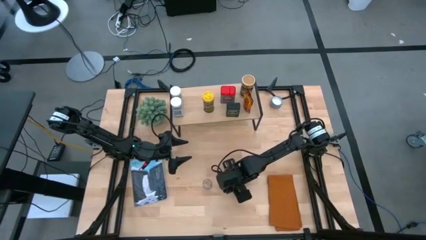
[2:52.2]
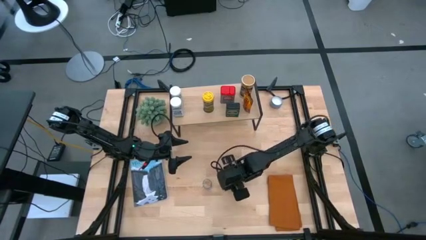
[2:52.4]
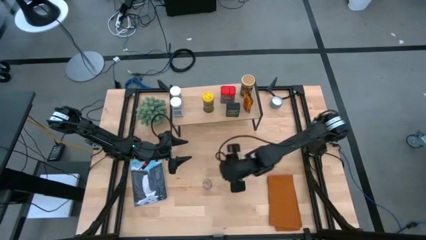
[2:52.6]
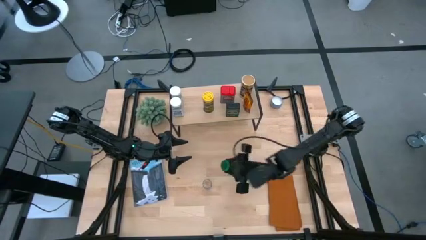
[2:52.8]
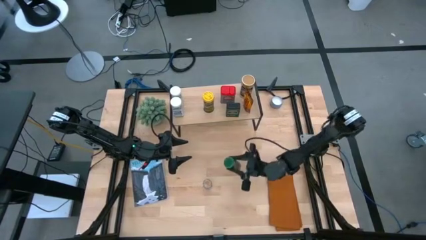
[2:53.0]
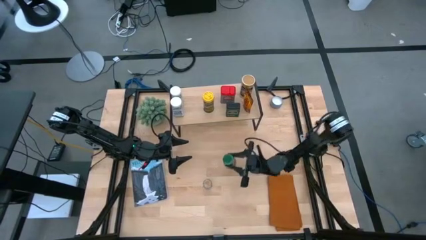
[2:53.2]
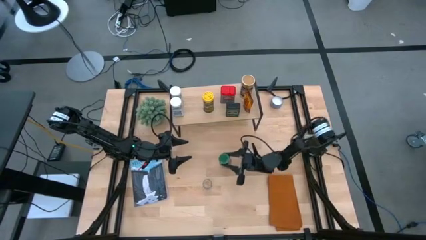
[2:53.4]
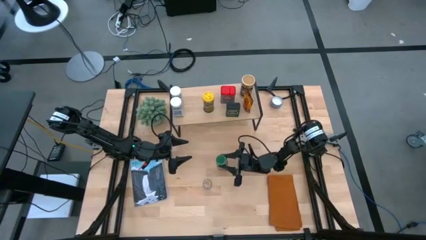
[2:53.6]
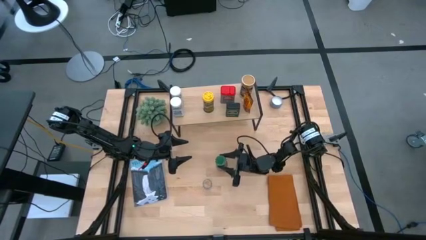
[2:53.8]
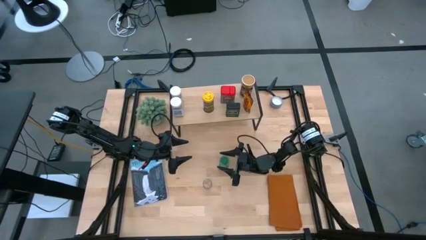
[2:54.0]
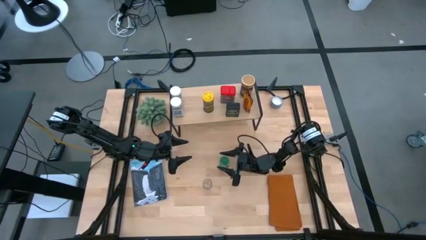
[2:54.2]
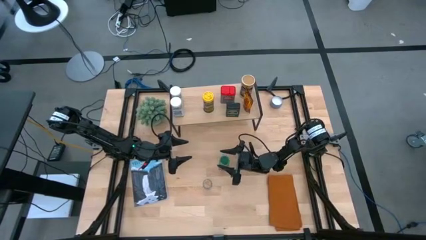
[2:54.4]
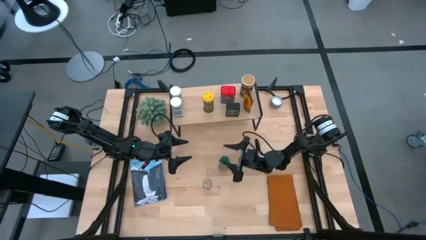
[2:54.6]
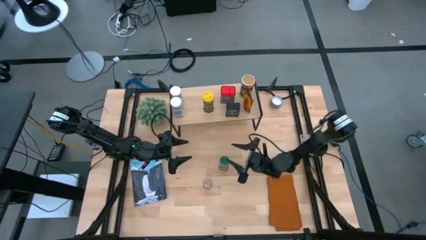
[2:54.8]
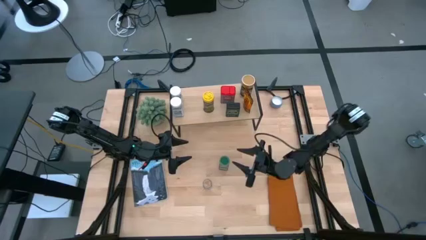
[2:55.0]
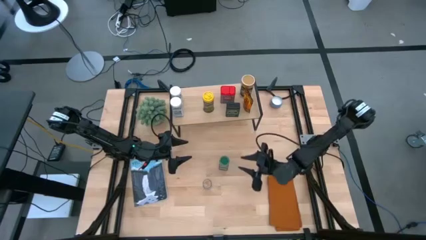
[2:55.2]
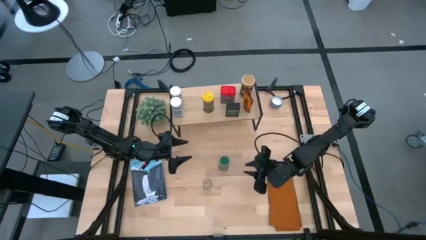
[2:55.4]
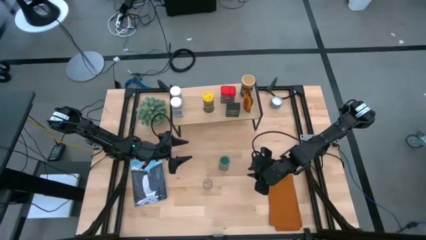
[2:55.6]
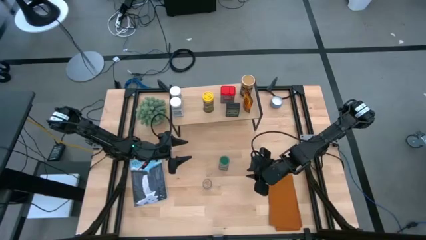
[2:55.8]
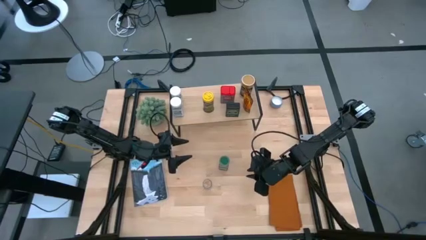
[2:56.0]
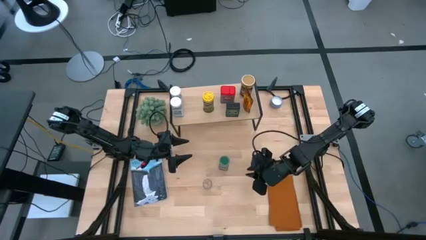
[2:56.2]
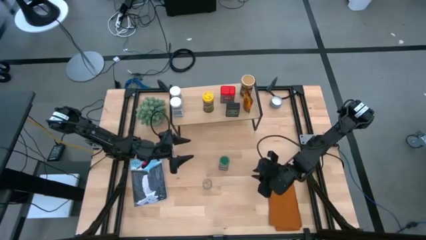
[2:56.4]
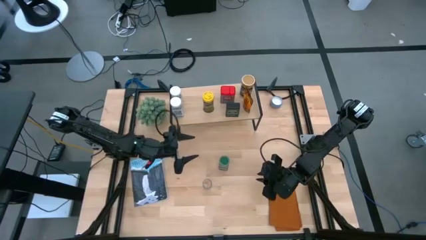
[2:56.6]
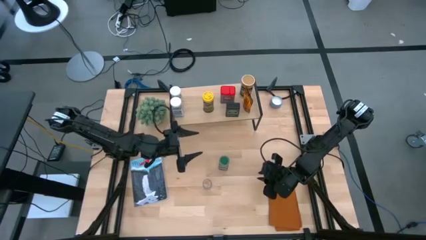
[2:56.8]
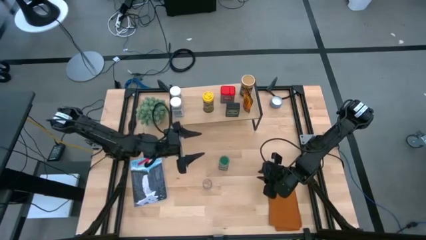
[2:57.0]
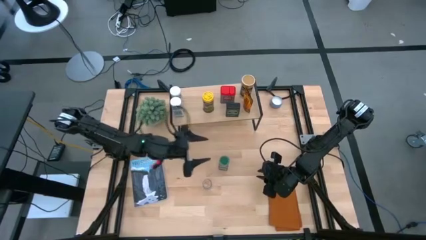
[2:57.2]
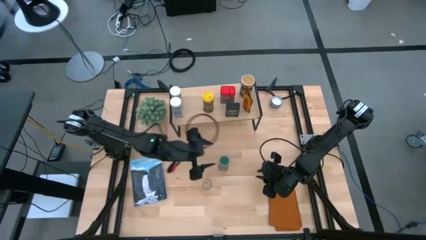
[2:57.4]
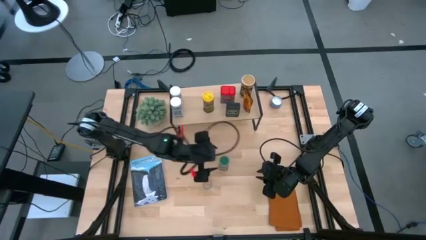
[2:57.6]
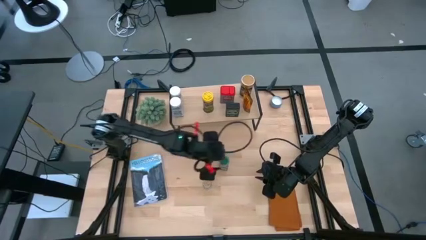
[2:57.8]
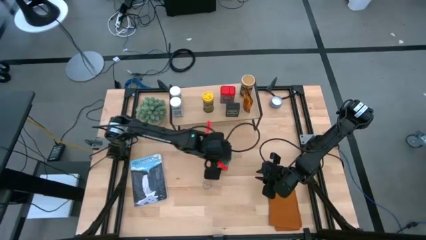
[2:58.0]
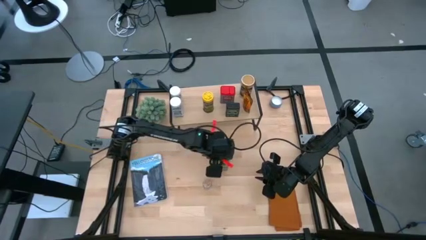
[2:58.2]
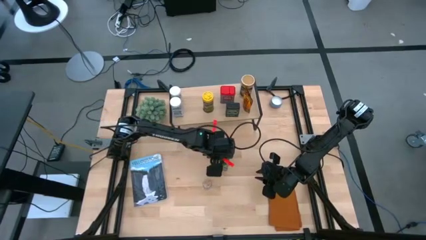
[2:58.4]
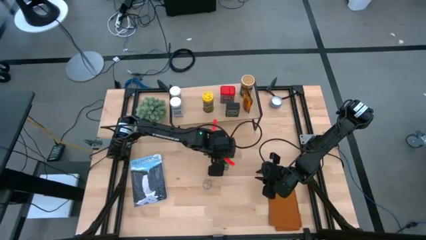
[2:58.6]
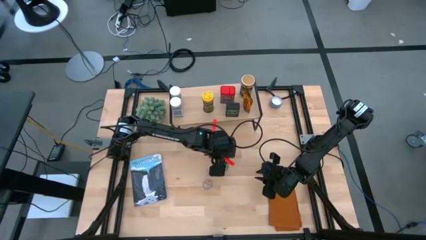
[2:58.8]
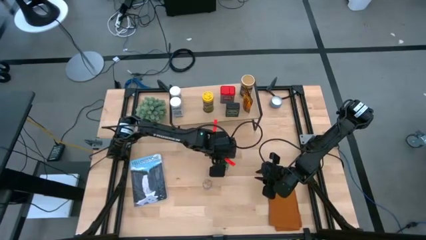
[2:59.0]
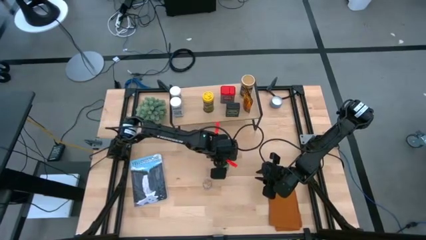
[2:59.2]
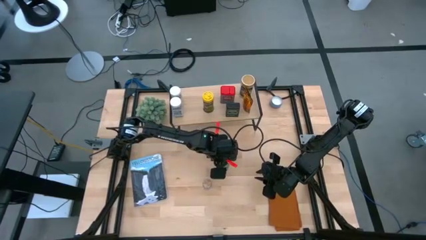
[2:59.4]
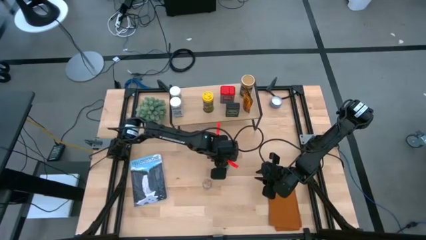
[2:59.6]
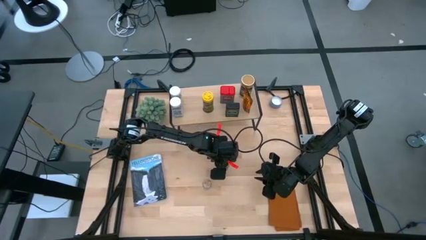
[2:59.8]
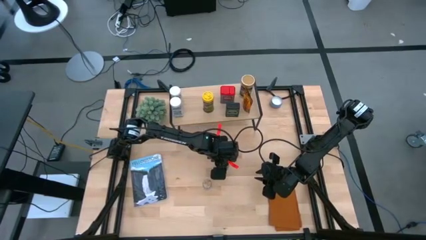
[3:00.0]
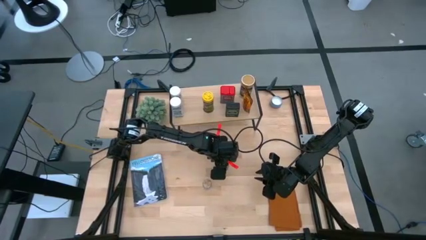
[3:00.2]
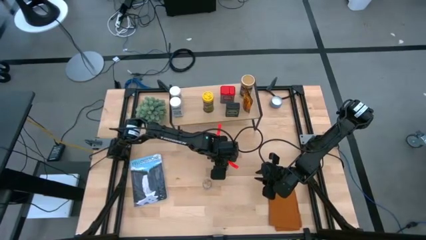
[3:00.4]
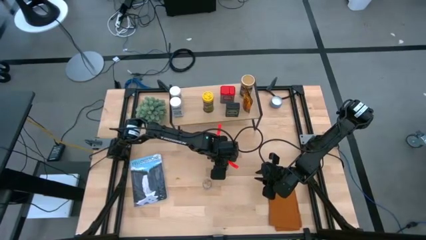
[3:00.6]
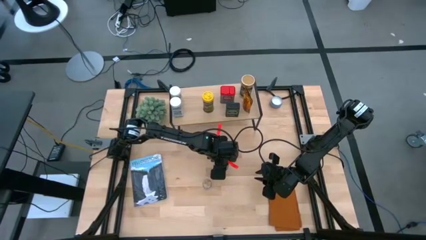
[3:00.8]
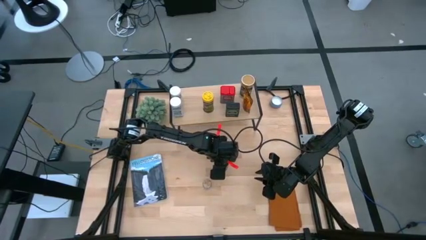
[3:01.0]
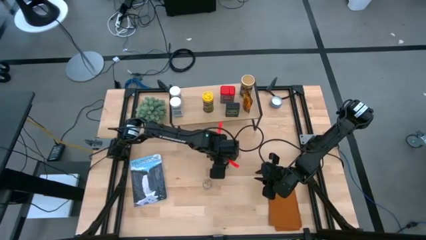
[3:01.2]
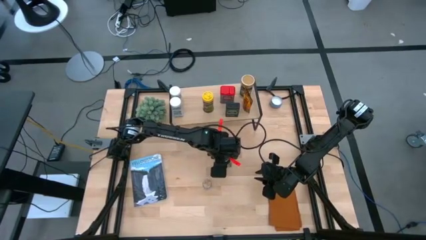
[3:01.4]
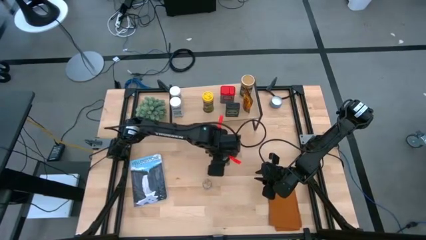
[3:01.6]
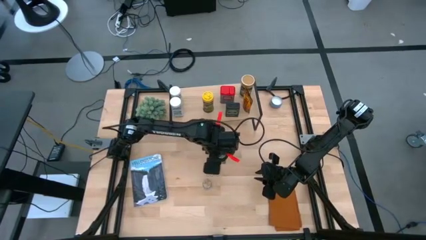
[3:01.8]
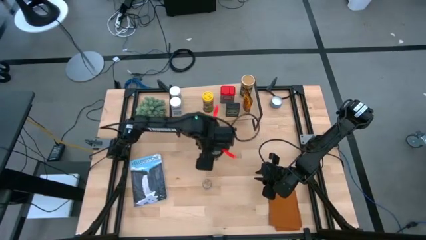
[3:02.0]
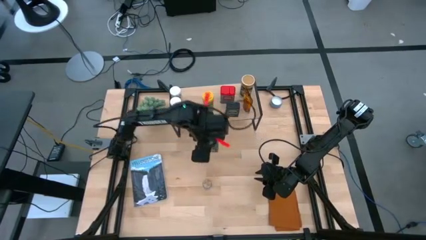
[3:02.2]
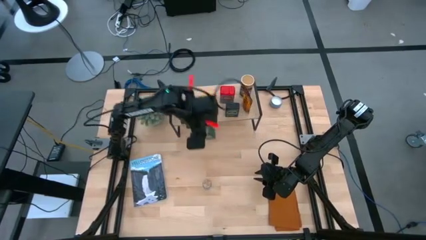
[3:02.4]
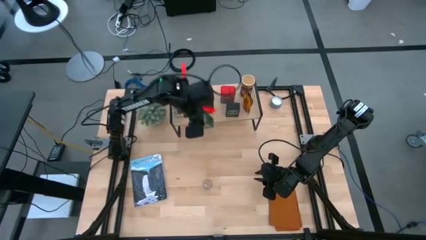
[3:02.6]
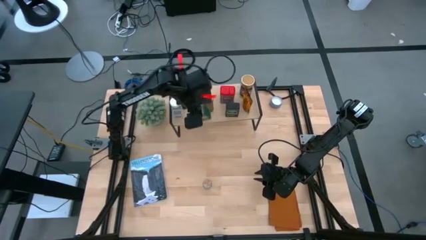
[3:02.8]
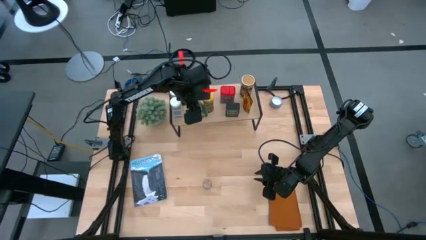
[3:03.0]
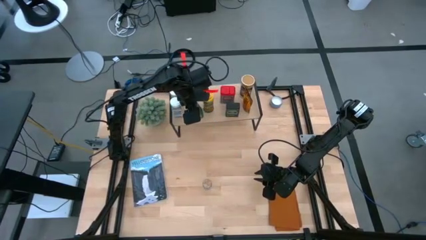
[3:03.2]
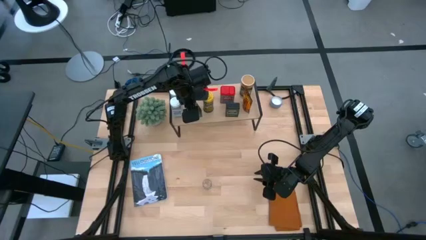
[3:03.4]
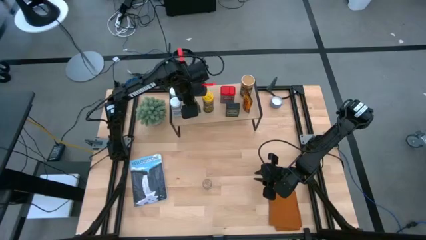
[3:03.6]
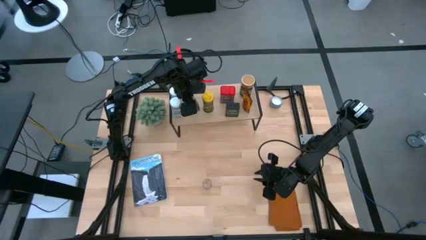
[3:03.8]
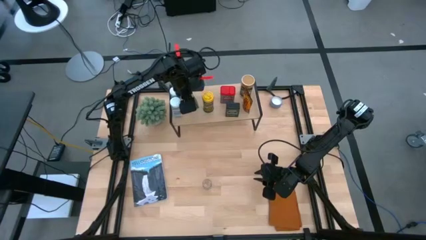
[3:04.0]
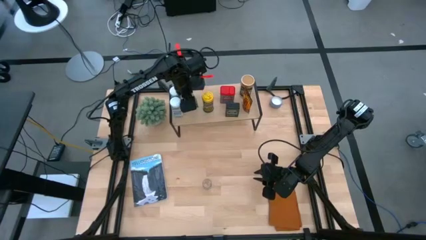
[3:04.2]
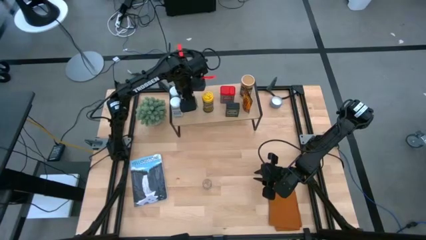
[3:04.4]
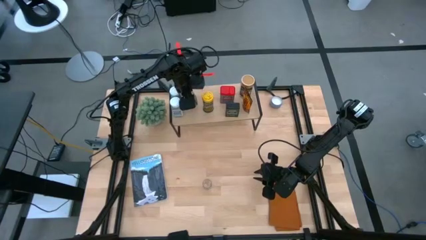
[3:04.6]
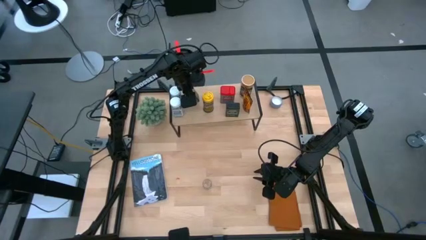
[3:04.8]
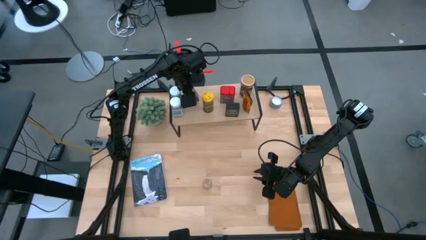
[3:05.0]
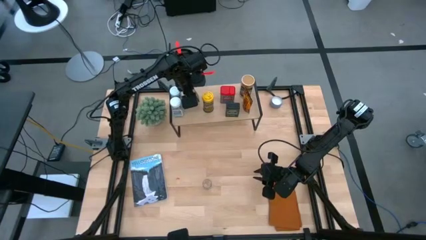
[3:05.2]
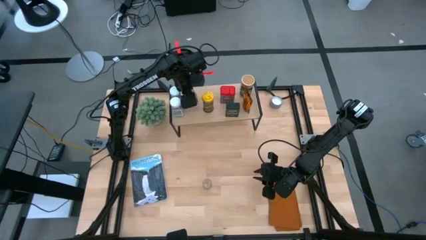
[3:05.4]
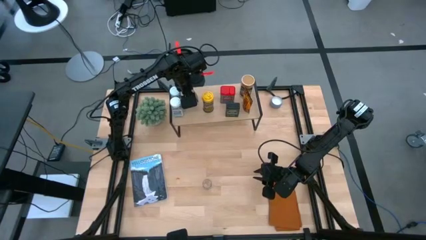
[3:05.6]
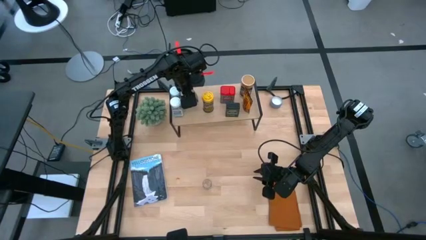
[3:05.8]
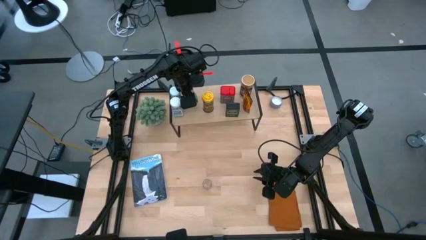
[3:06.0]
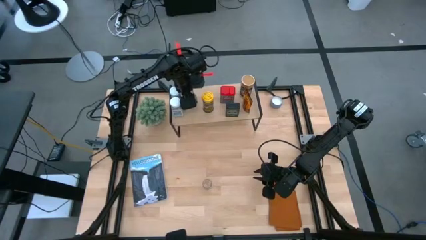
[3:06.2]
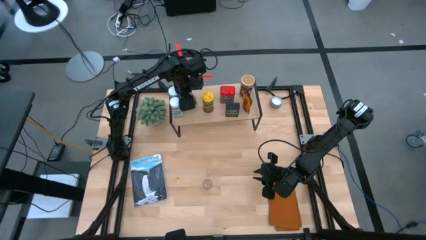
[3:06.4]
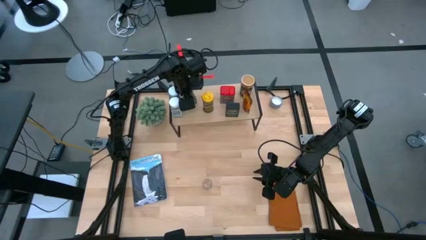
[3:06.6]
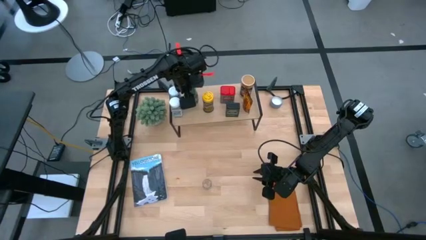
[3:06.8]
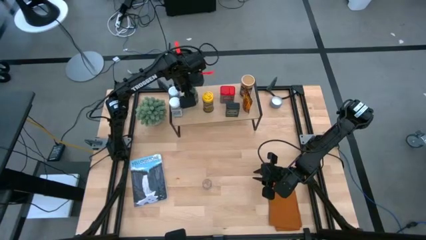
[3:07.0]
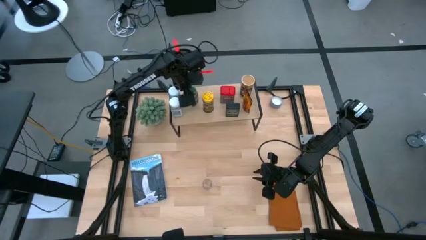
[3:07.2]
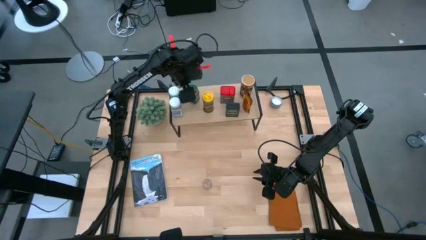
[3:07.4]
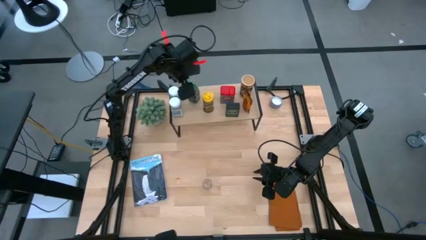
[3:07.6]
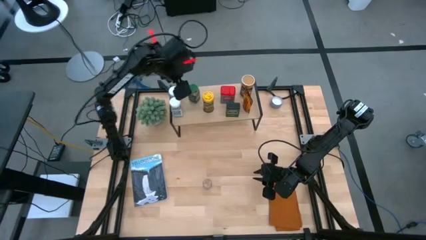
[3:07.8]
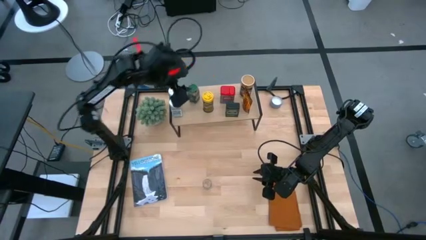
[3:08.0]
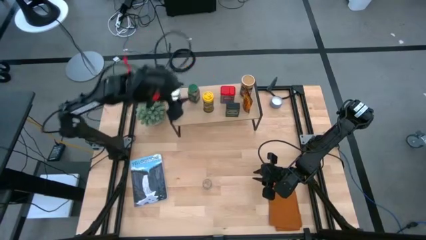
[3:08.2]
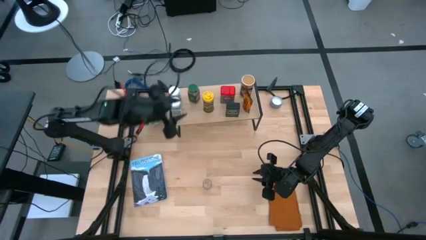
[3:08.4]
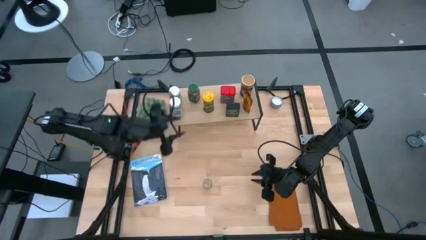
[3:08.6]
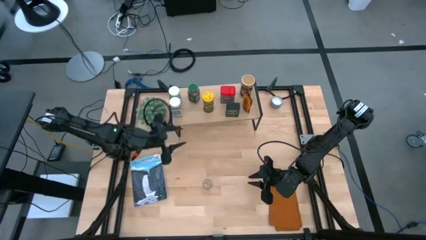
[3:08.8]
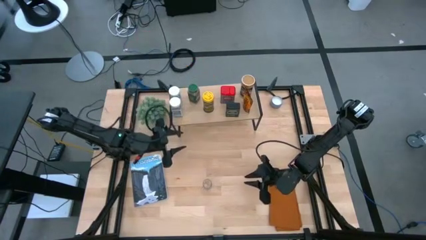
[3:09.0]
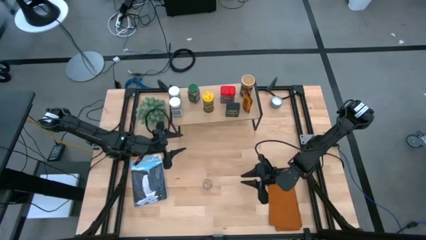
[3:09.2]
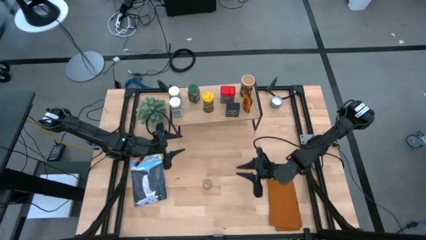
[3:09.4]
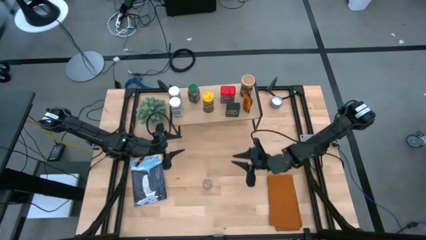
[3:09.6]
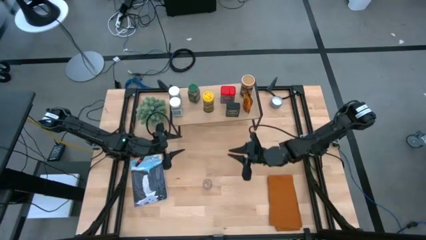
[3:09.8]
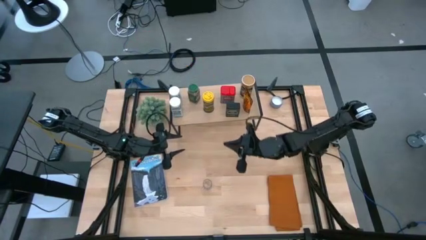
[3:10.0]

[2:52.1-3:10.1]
Task: Shelf spices
Put the green seasoning bottle on the shelf
